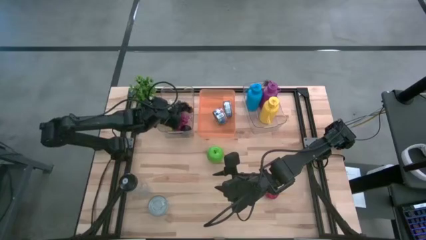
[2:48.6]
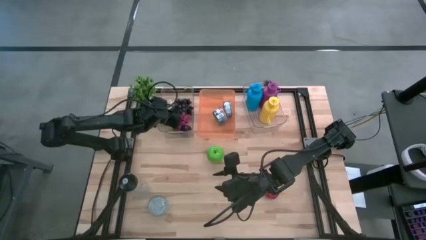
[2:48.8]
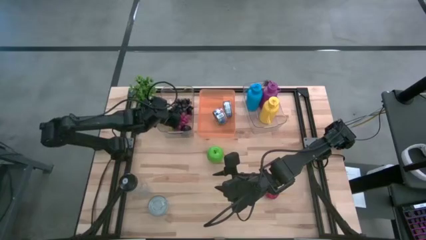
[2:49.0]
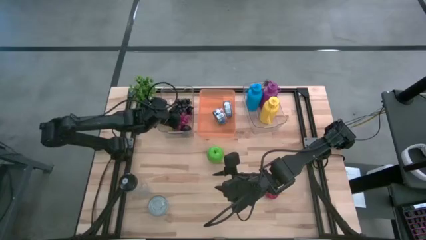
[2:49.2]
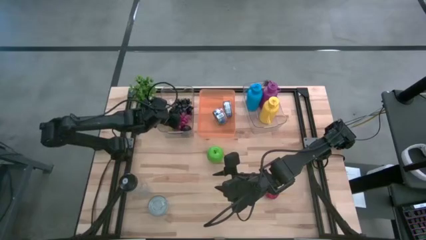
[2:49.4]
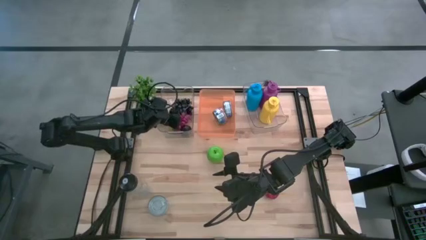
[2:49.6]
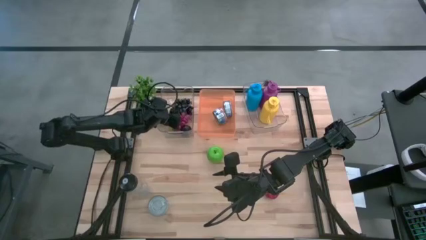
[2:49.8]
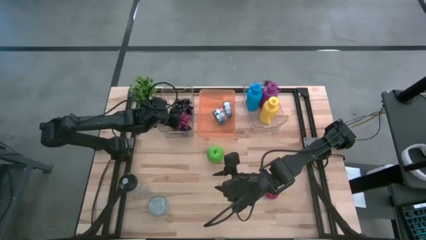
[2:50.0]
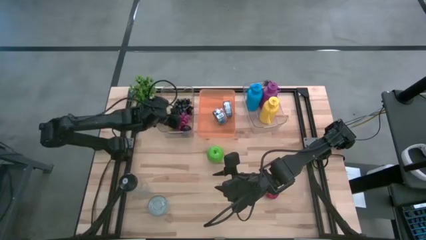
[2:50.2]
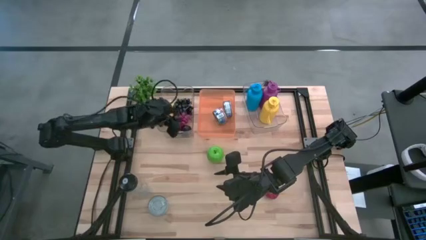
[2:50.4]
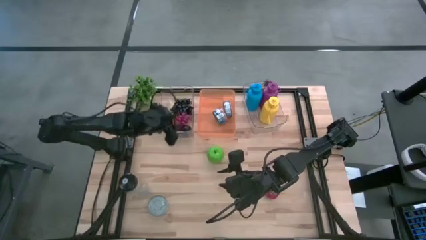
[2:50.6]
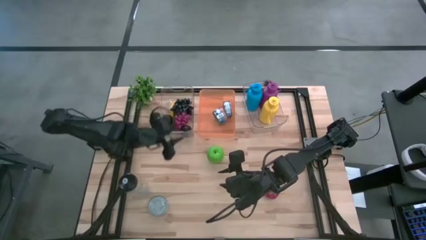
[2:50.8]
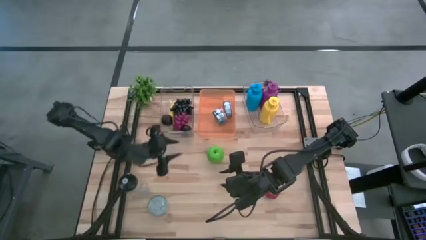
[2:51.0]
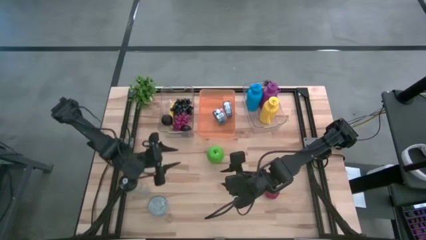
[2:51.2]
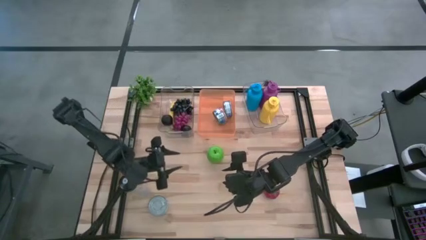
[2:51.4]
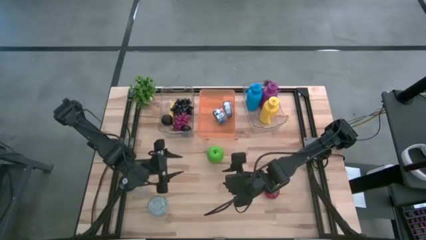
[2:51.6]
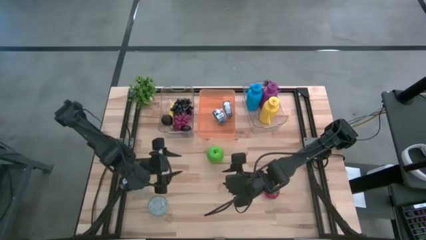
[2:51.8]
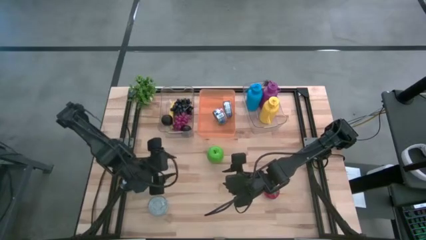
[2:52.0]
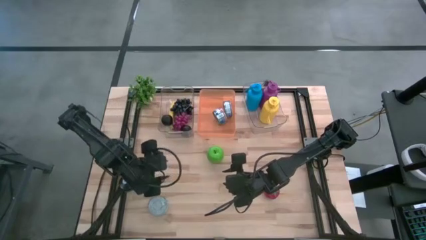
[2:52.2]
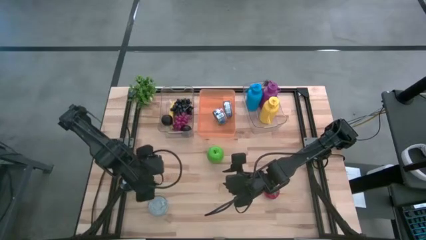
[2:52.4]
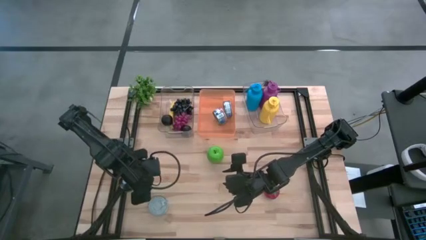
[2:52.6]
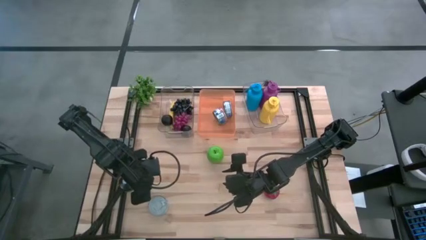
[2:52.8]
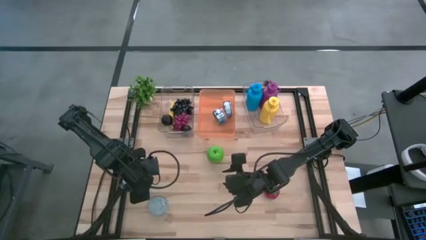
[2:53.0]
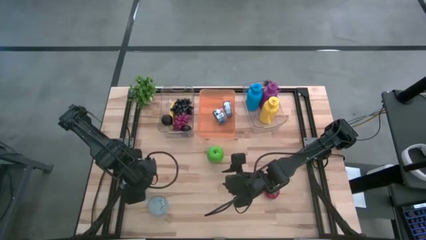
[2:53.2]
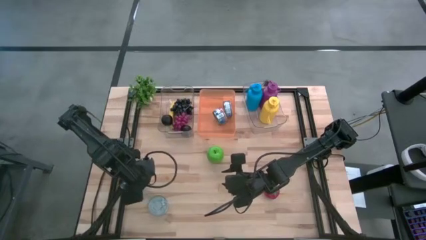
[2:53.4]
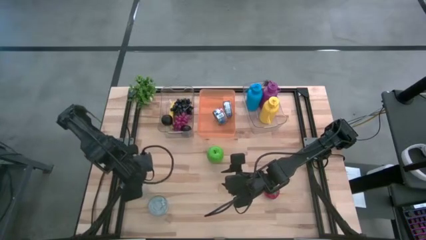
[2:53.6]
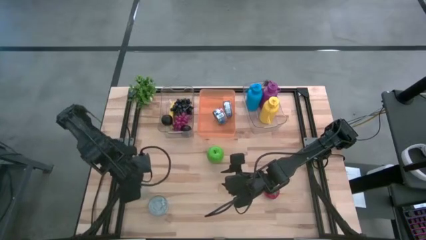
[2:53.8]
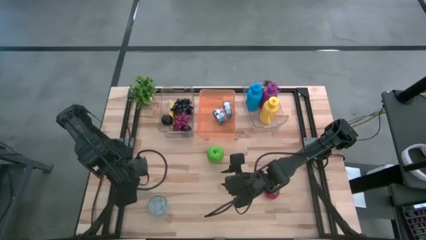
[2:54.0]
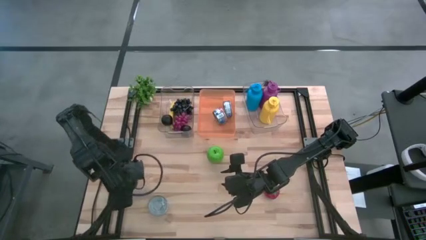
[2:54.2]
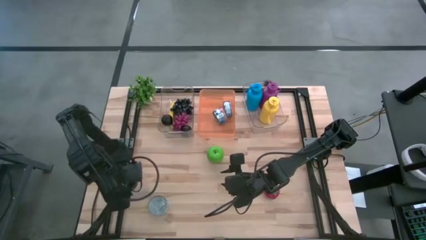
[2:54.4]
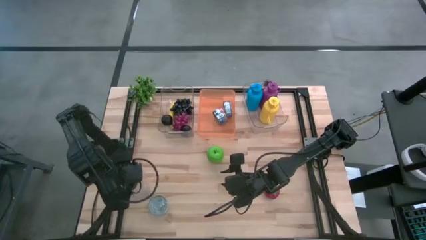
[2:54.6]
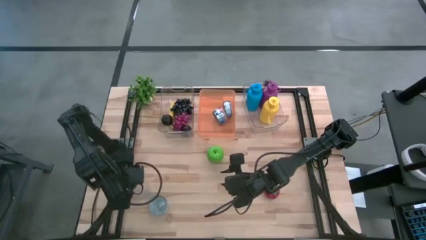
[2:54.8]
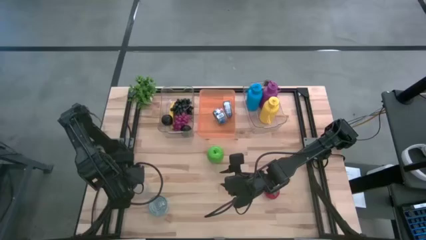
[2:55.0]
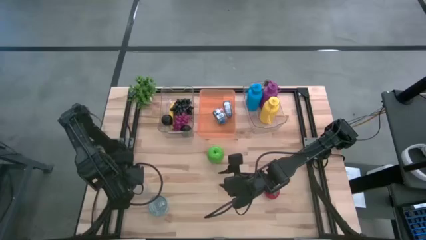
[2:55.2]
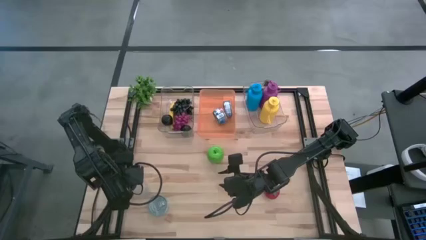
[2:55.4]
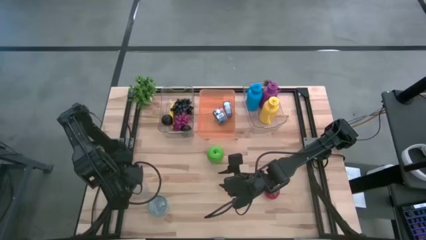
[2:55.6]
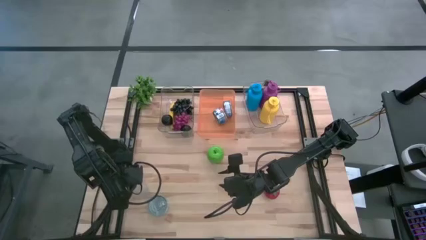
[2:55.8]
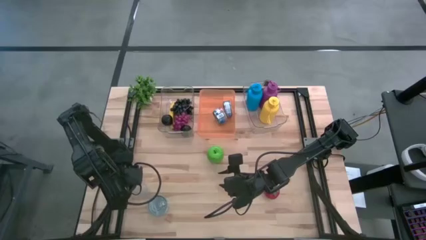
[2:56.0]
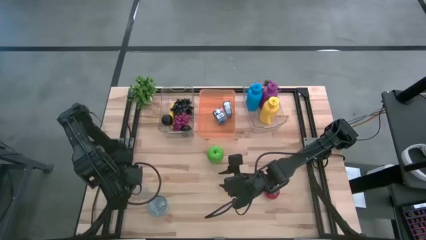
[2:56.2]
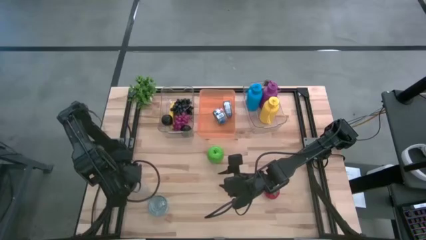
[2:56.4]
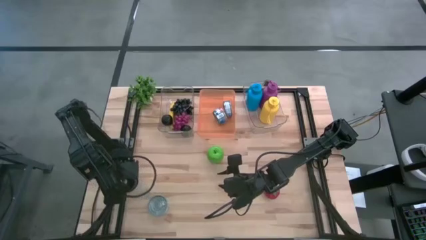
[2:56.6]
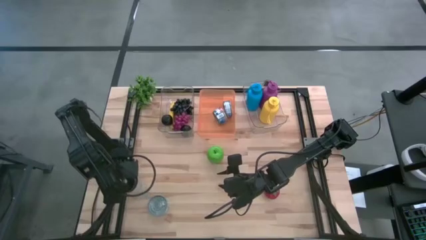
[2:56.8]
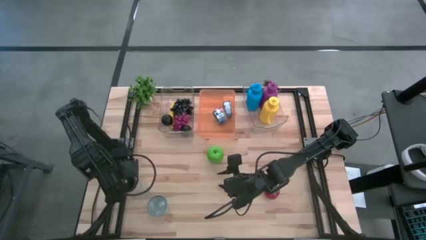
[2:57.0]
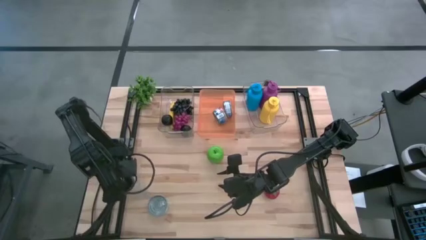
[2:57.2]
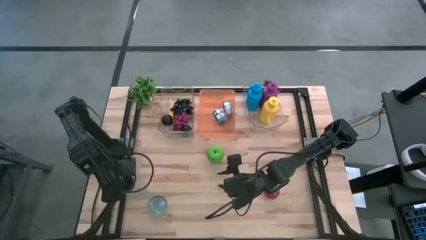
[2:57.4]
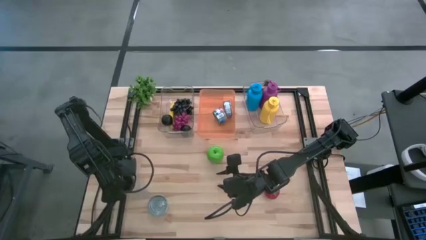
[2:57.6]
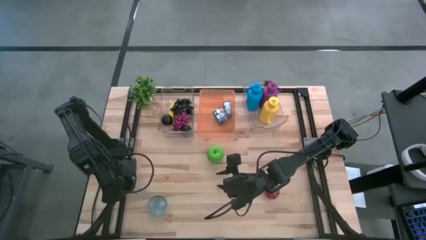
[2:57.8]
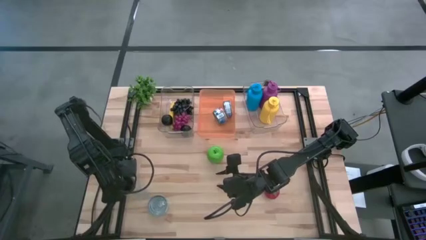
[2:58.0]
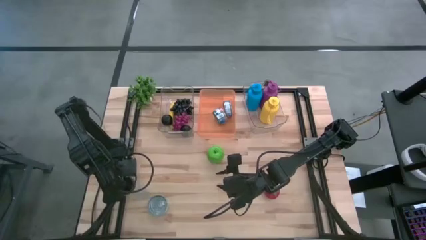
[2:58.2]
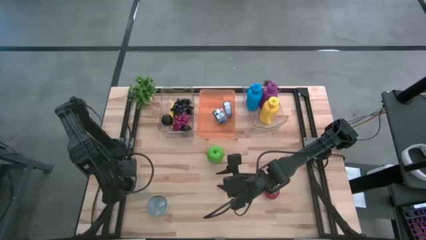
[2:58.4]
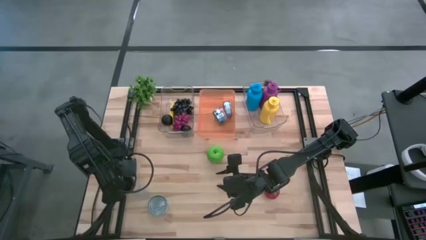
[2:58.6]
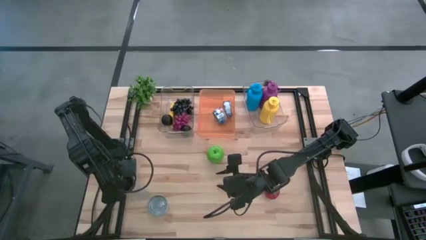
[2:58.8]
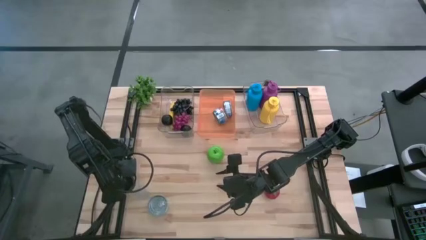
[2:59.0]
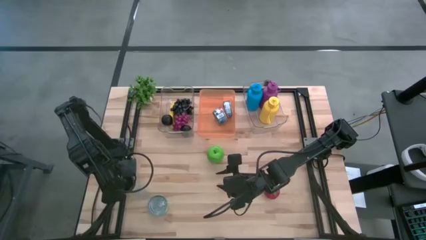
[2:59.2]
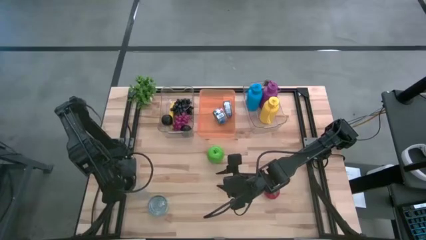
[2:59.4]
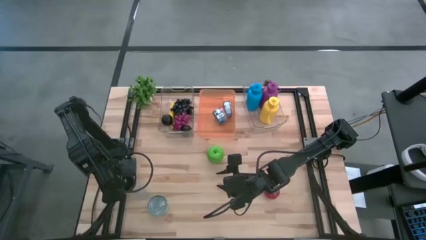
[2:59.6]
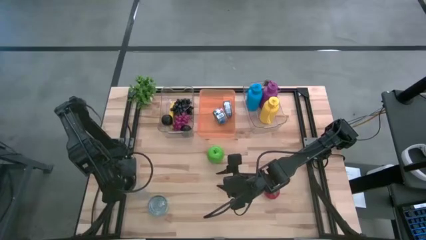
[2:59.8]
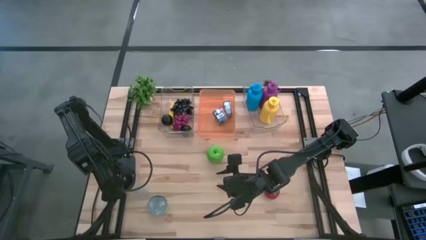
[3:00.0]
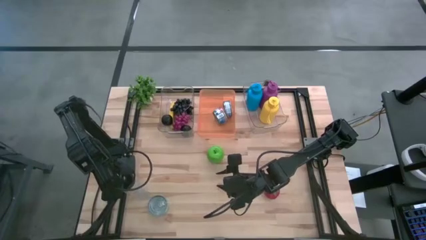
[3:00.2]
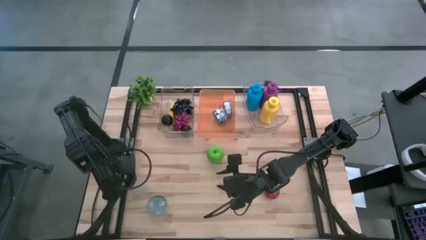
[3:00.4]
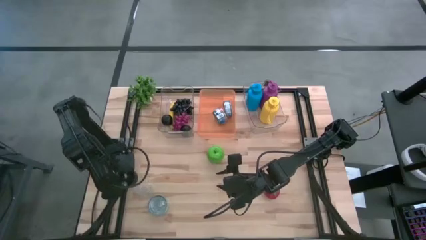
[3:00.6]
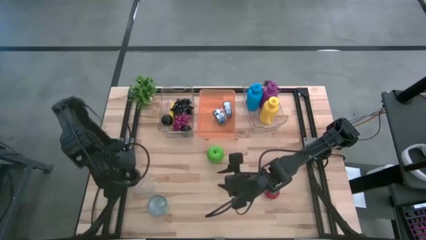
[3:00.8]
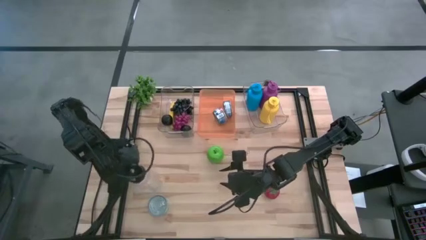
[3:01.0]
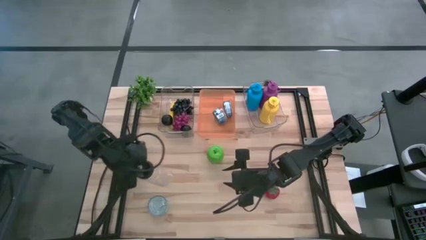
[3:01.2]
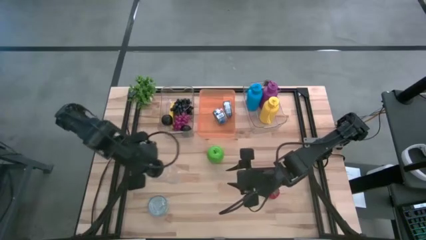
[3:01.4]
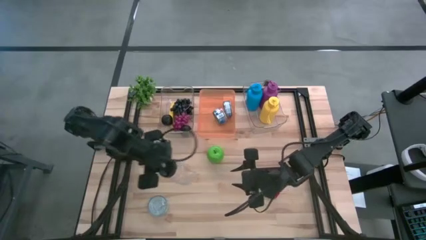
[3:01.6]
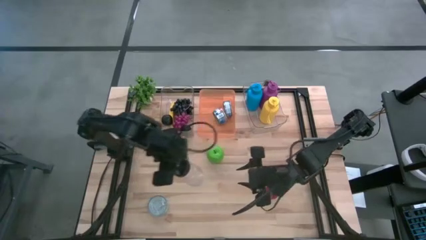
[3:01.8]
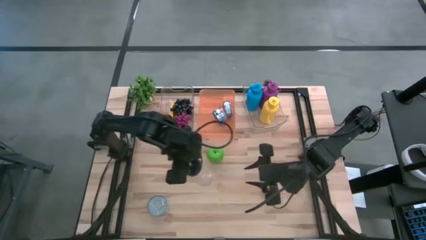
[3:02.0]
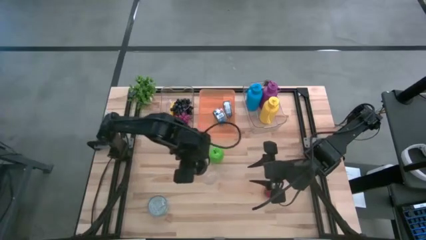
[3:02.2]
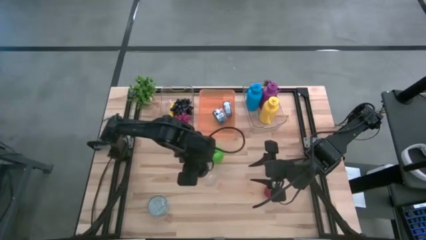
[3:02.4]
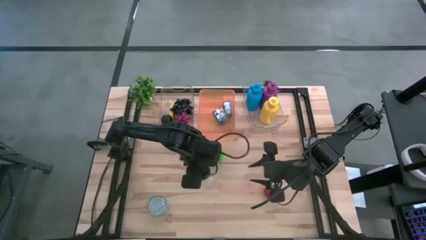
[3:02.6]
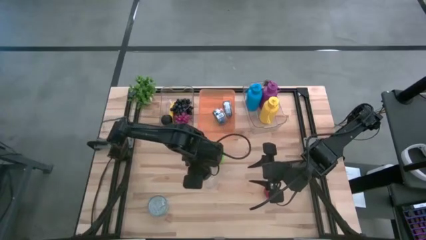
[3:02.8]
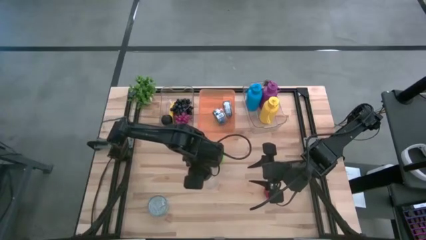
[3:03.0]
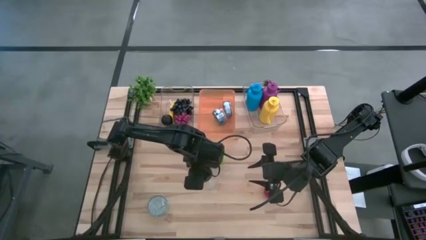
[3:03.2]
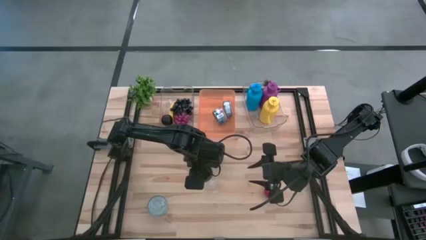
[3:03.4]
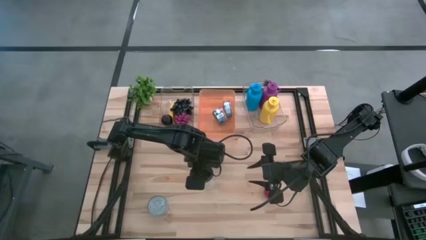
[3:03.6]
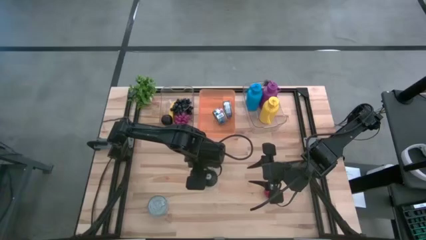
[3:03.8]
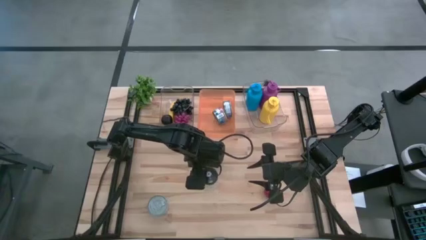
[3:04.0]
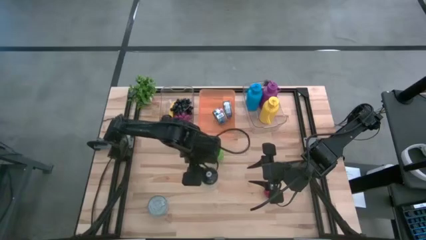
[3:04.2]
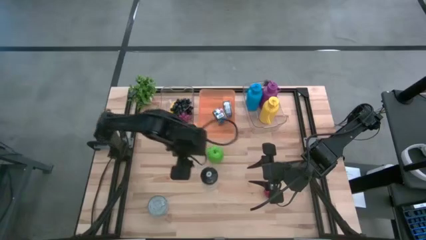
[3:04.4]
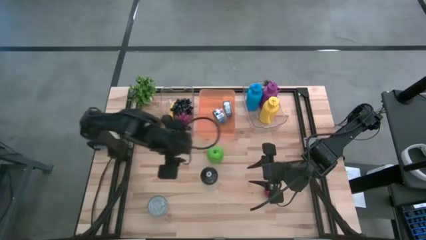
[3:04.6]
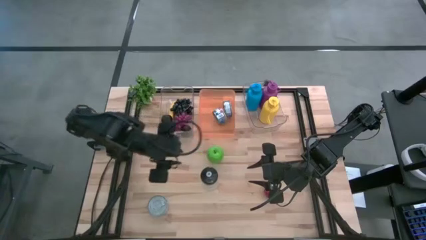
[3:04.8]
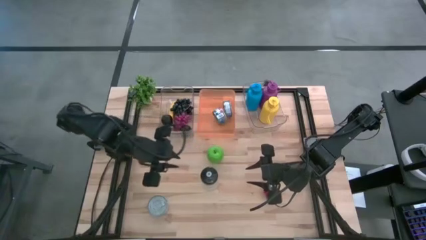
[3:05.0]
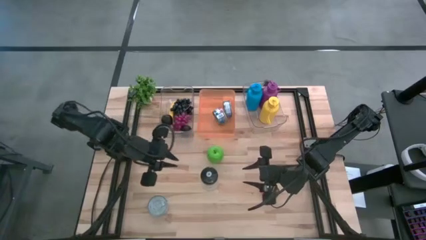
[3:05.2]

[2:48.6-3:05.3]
Task: Pick & Place Food Item
Put the transparent water bottle into the right transparent bin
